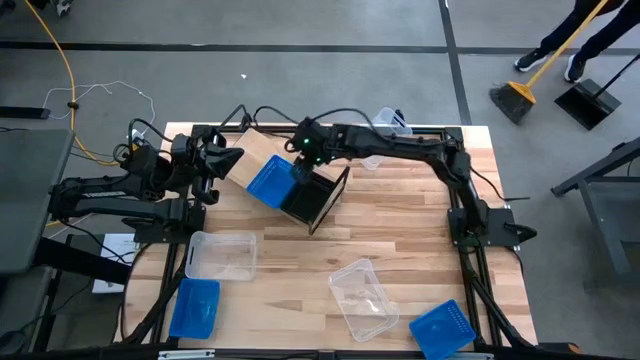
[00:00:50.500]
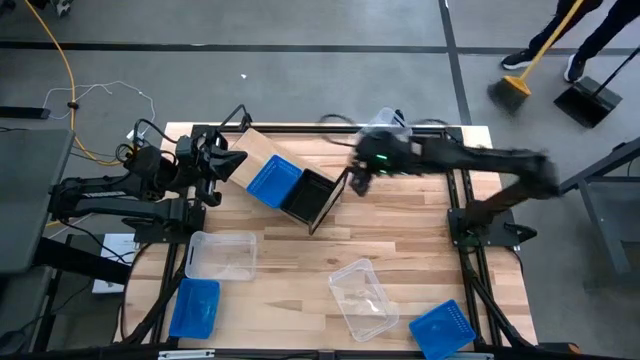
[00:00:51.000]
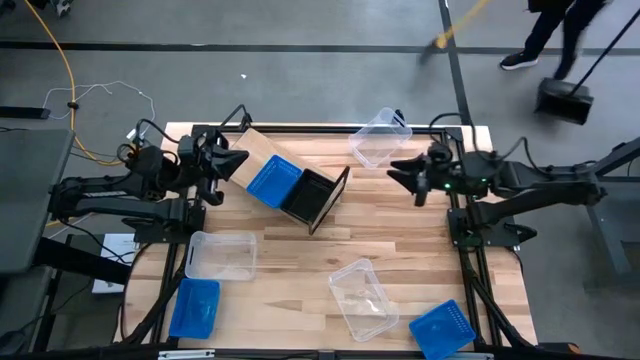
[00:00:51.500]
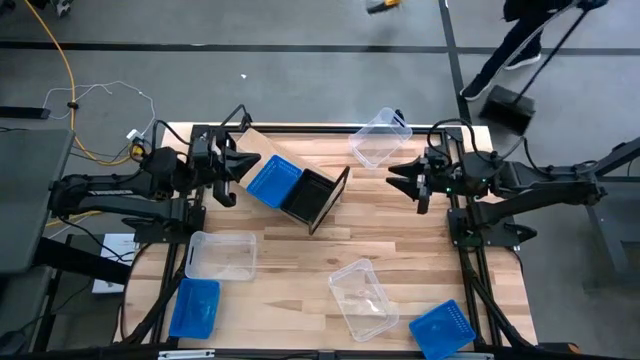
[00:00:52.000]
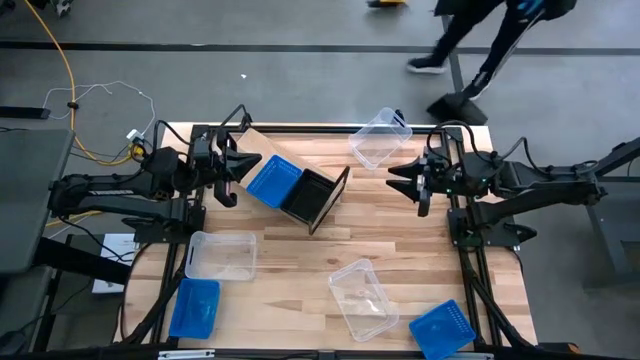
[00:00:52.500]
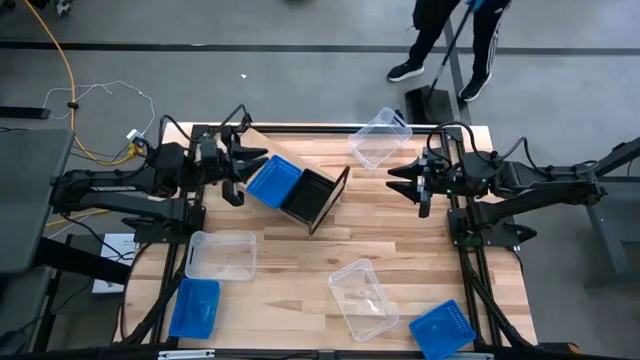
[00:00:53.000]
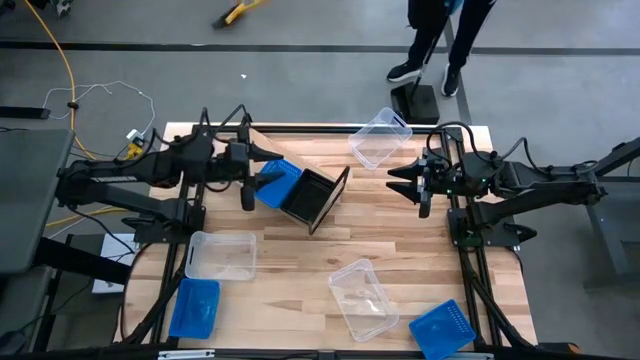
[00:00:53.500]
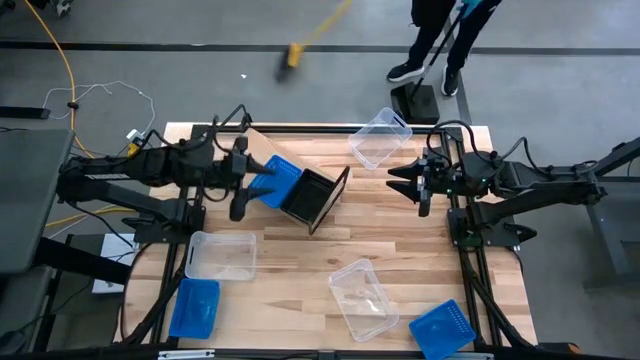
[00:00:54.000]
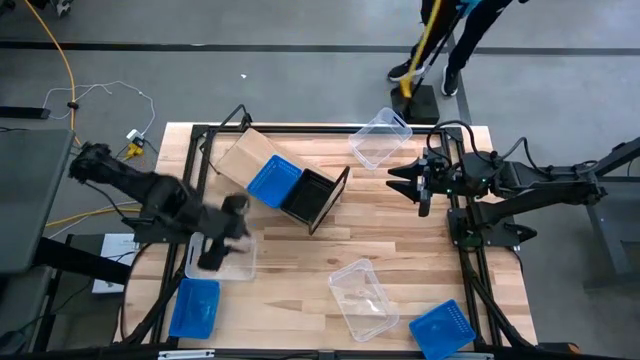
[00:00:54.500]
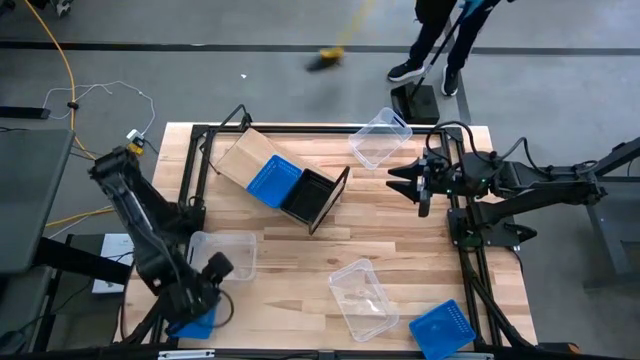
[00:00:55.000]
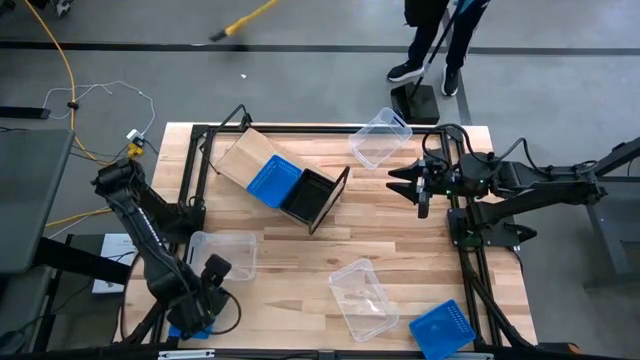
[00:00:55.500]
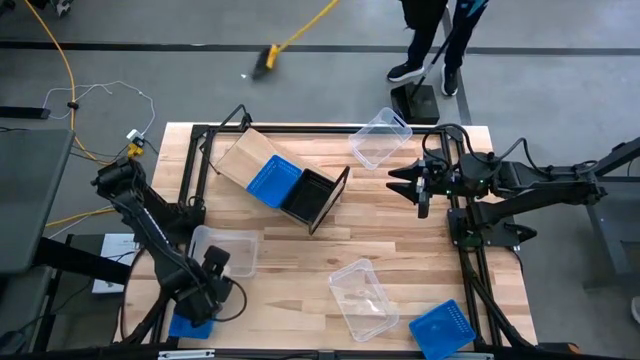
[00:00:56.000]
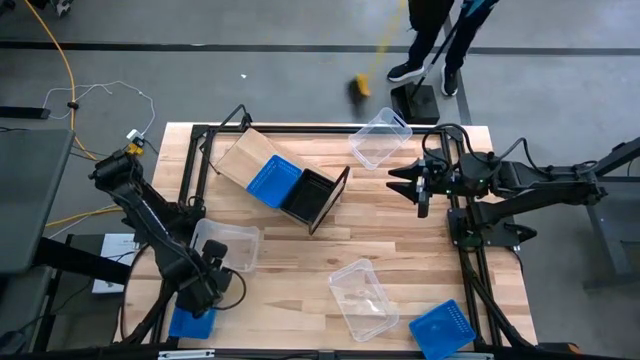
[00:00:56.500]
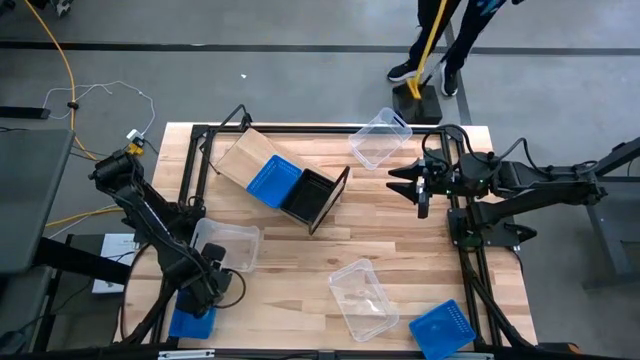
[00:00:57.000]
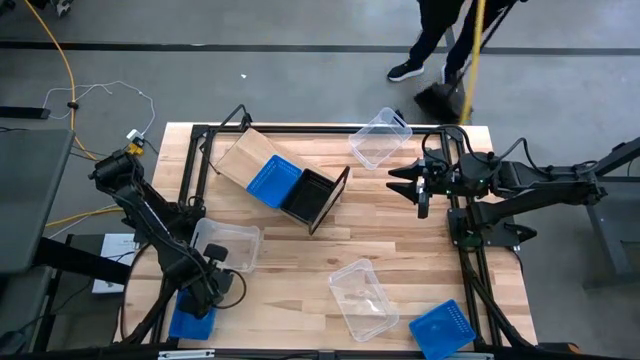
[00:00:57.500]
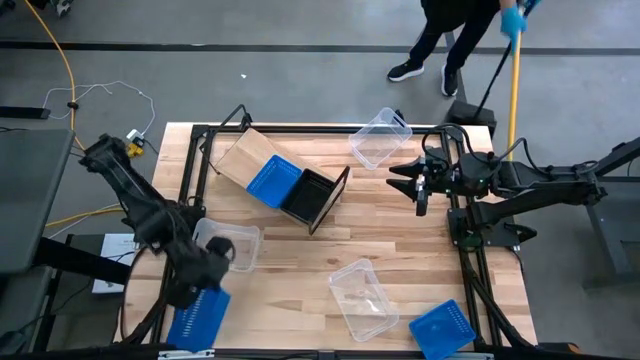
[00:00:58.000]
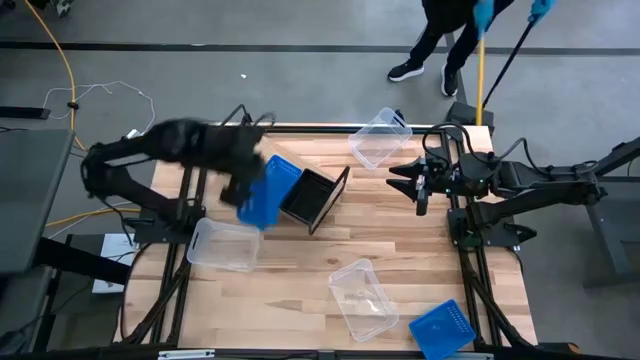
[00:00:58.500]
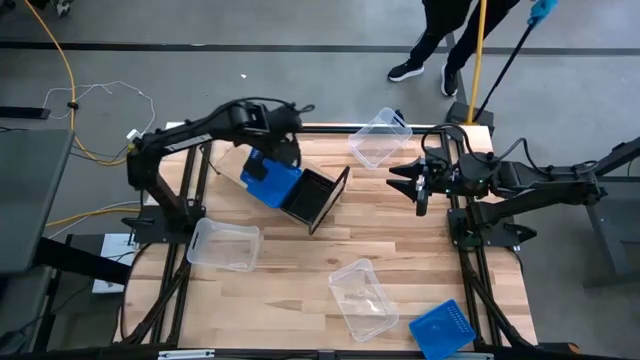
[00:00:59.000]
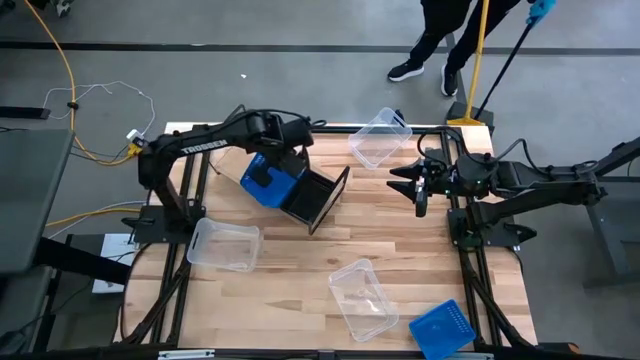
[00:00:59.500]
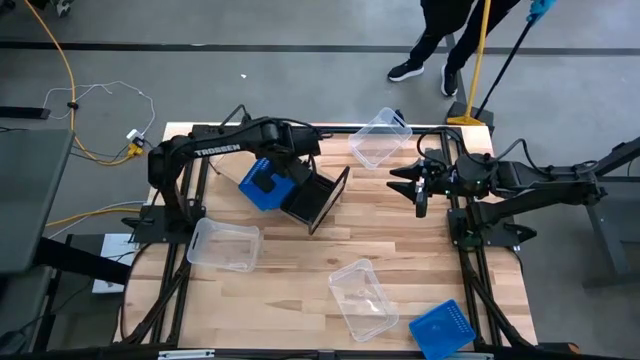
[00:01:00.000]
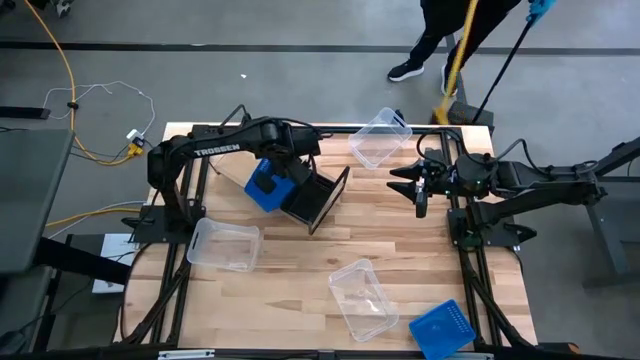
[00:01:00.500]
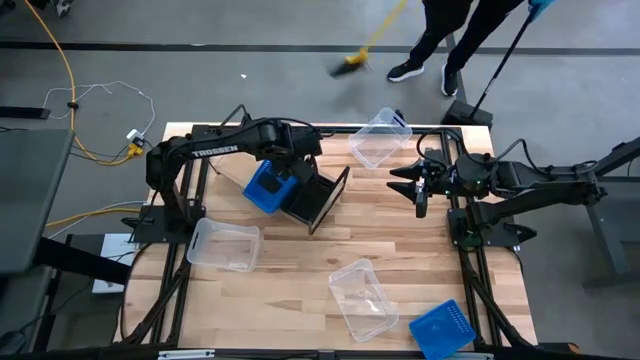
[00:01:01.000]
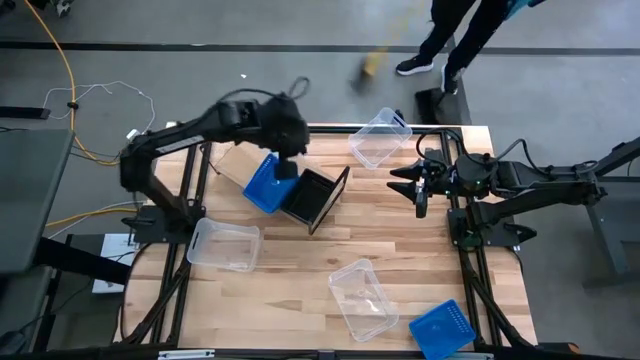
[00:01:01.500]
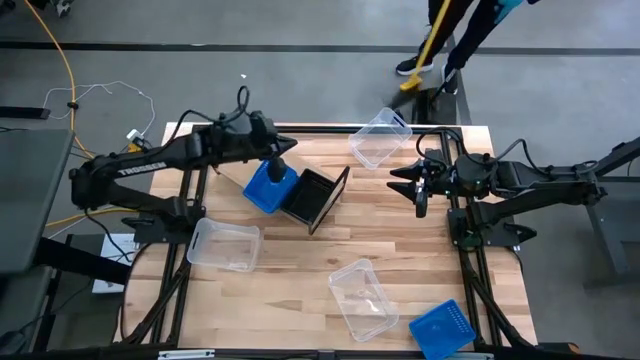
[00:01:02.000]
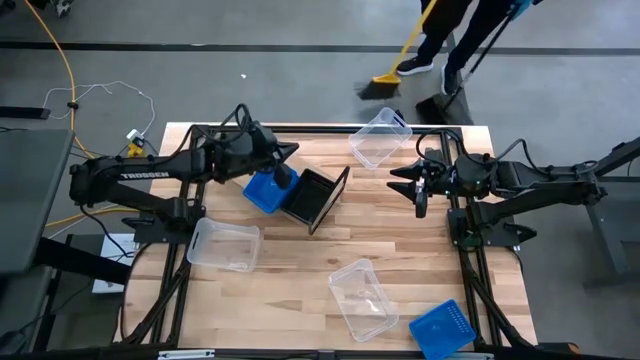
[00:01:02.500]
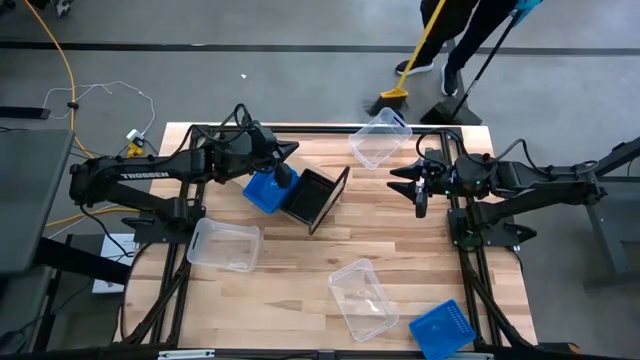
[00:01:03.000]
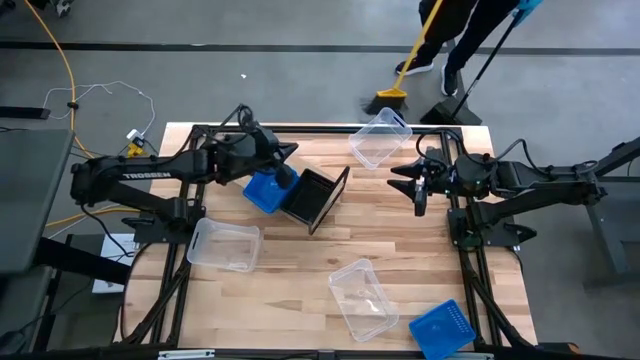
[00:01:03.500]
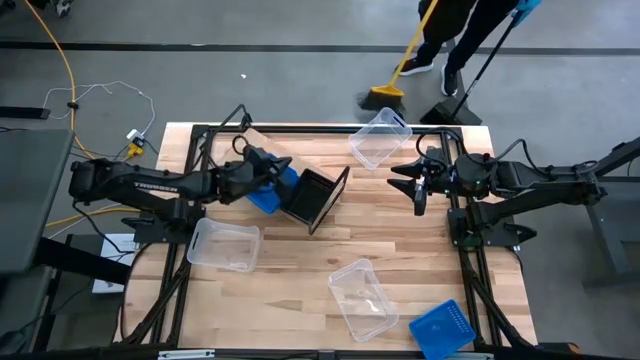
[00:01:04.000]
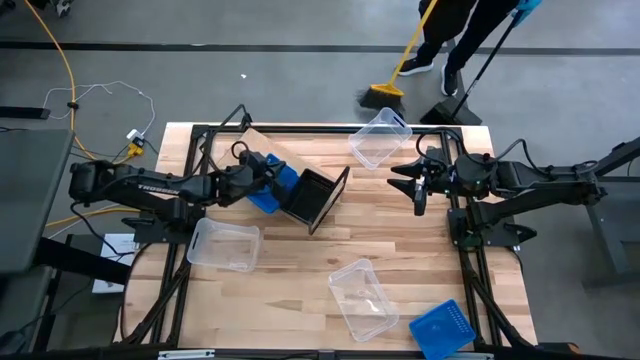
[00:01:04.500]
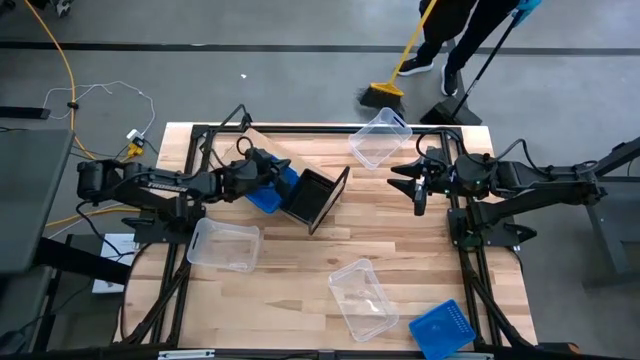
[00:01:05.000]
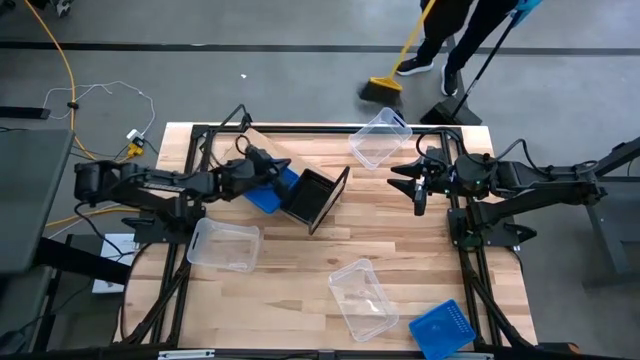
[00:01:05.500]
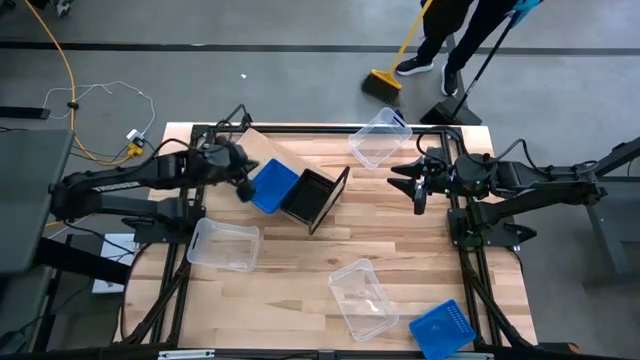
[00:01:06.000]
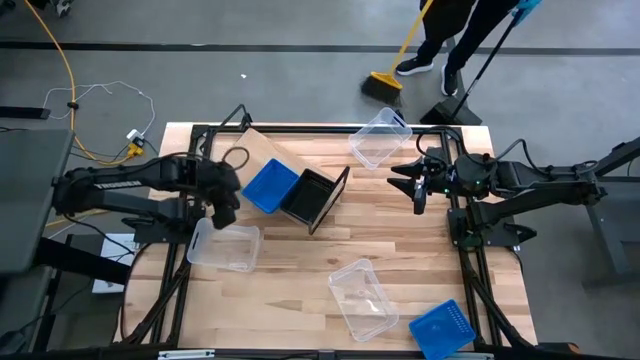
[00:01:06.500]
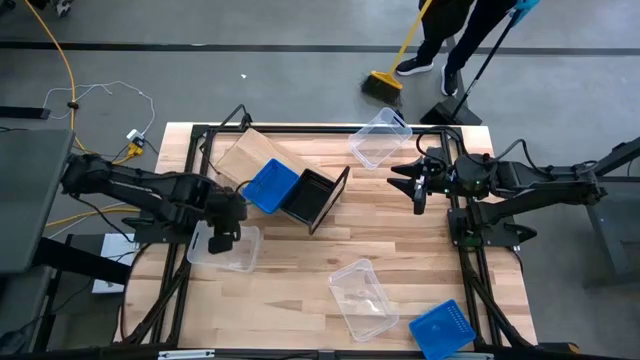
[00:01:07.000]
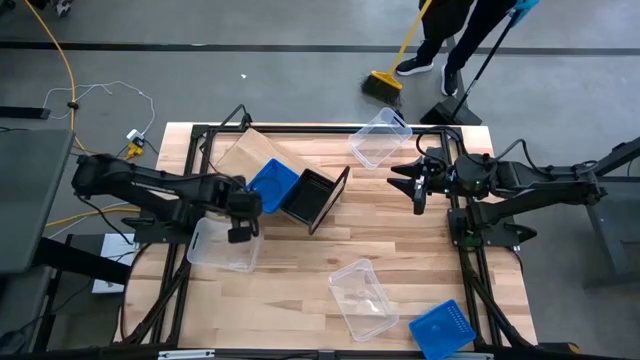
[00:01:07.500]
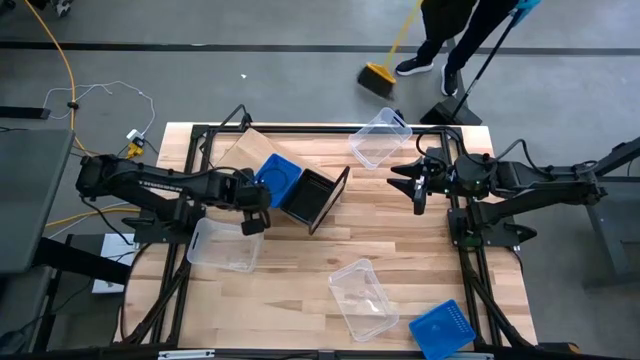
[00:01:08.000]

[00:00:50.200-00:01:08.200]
Task: Stack baskets on shelf by color
Stack the left blue bin on top of the other blue bin on the shelf

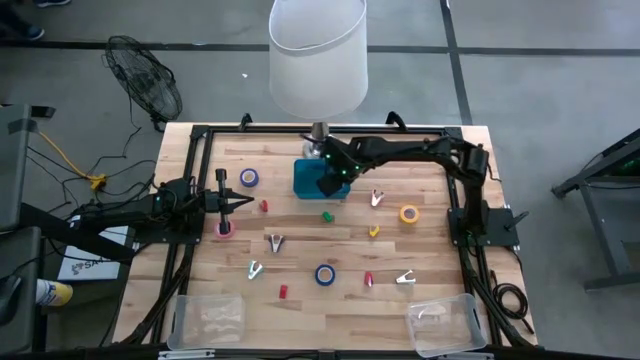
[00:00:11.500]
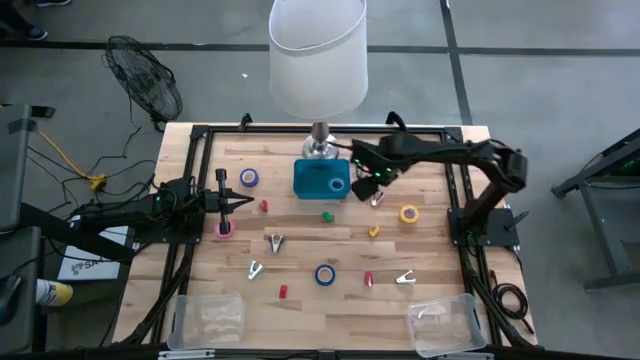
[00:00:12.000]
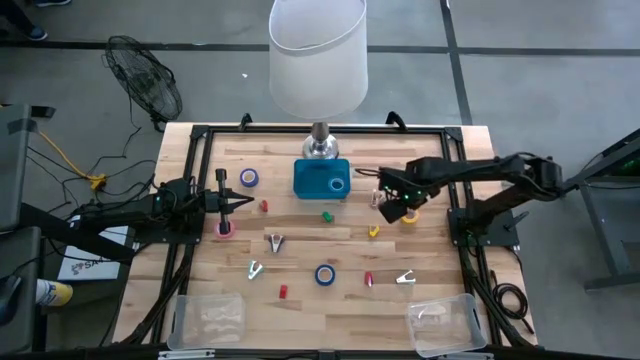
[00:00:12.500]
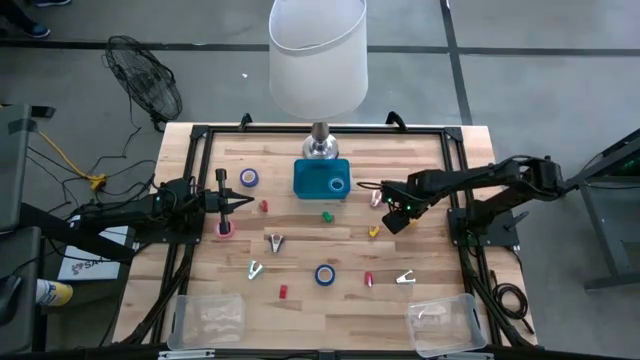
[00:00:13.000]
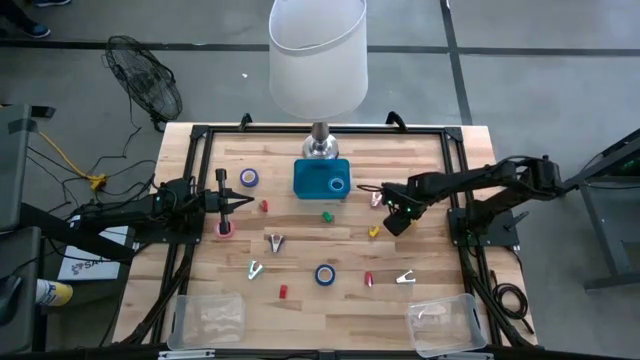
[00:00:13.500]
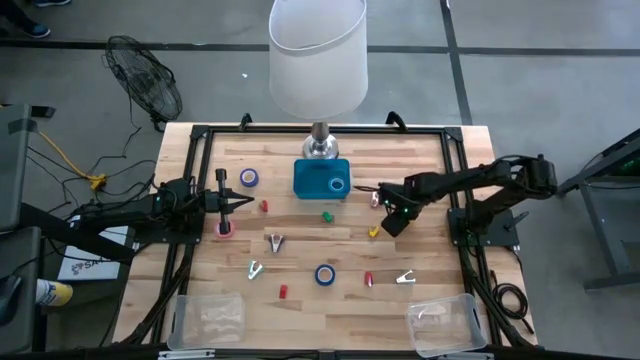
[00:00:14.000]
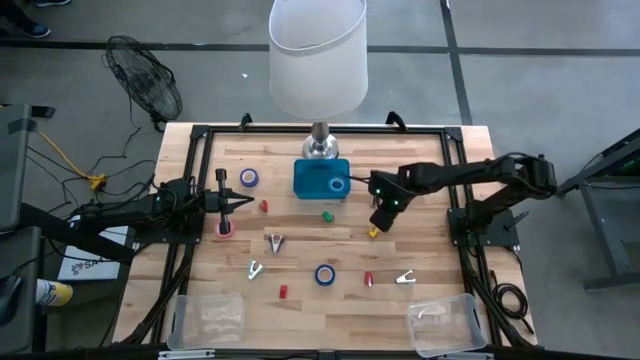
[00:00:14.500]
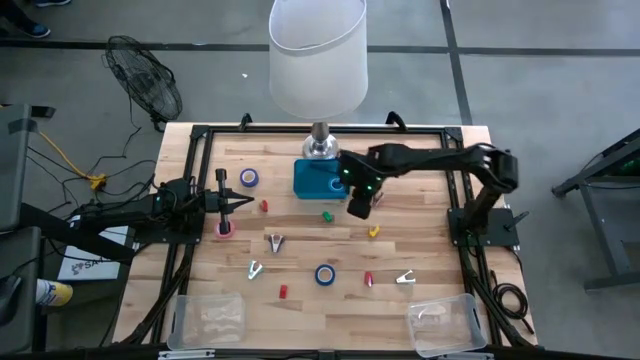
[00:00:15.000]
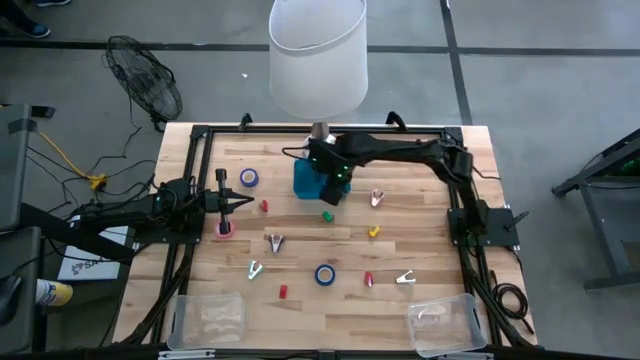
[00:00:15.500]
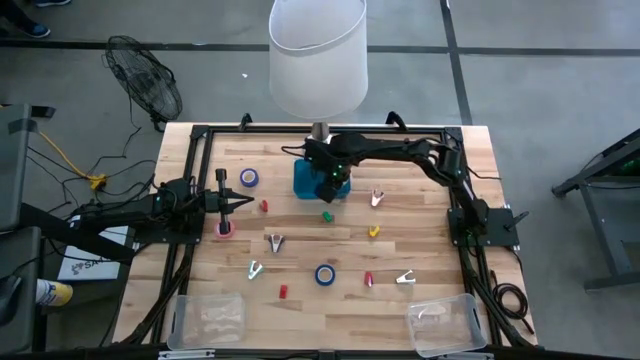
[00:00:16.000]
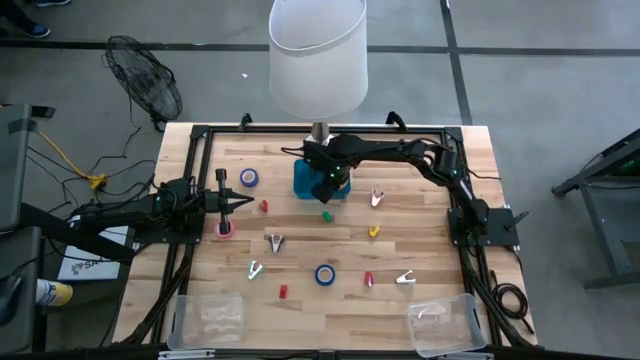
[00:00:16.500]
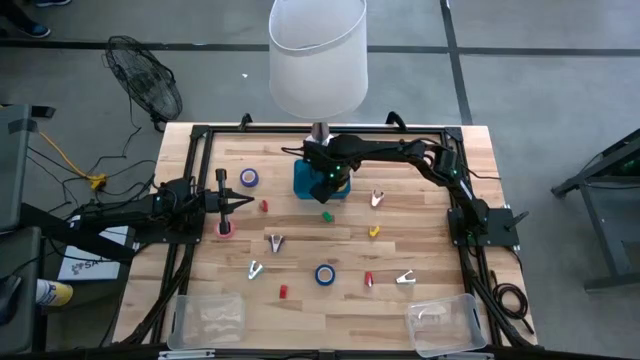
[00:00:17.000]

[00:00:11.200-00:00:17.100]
Task: Pick and place Stapler, Stapler remover, tape
Put the yellow tape into the blue bin
